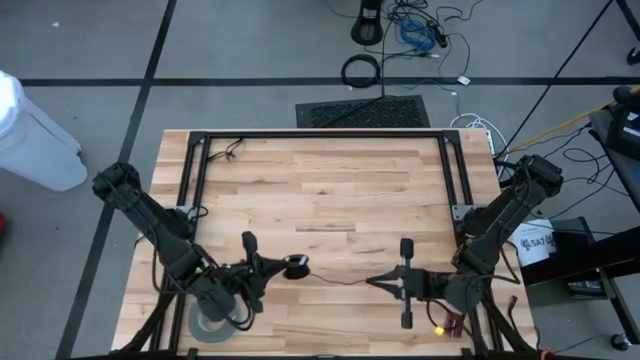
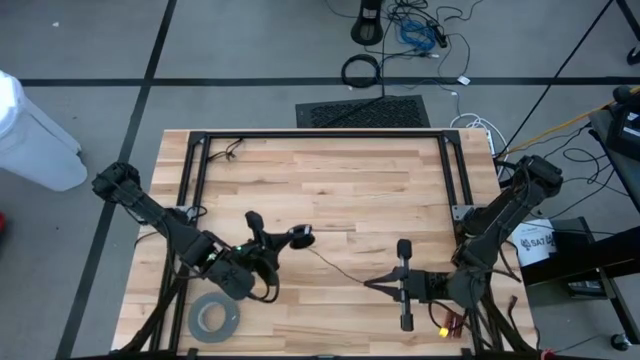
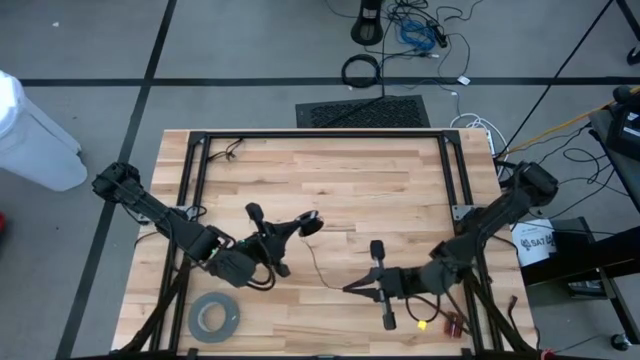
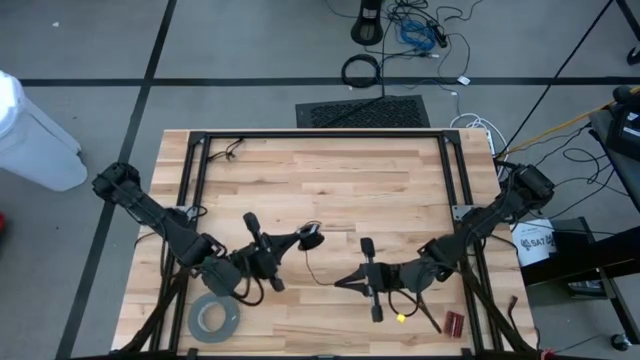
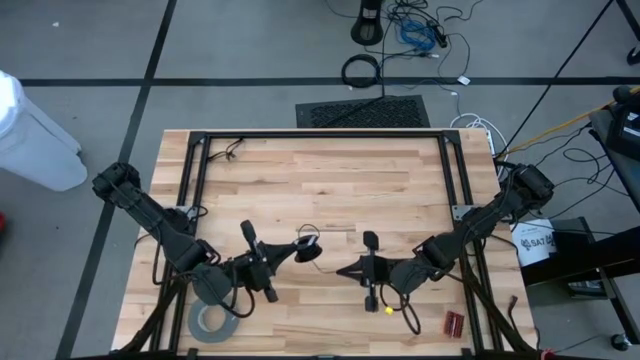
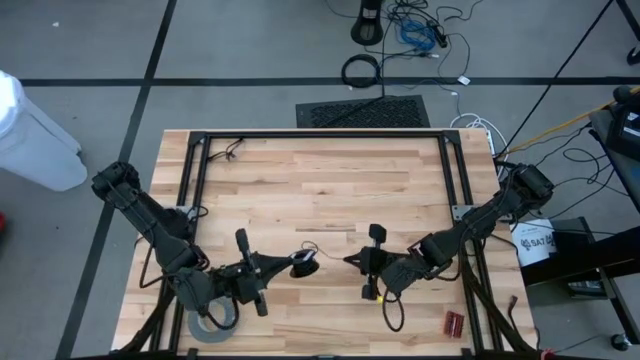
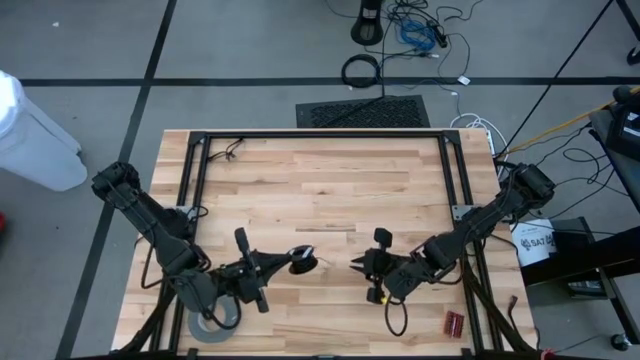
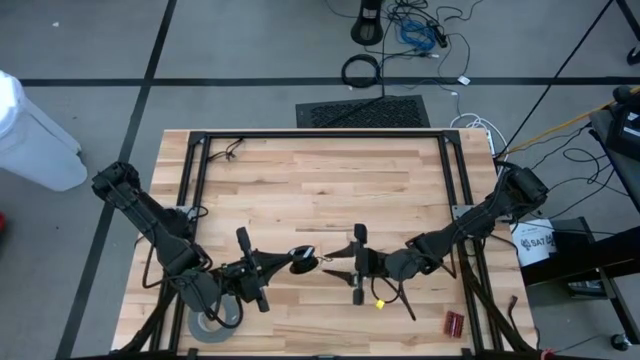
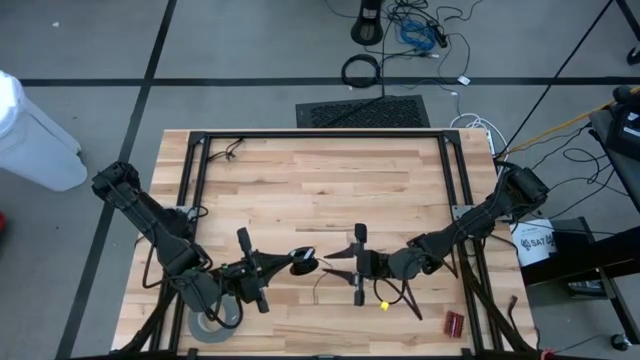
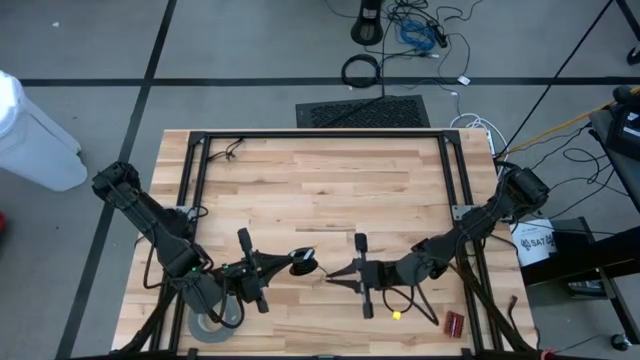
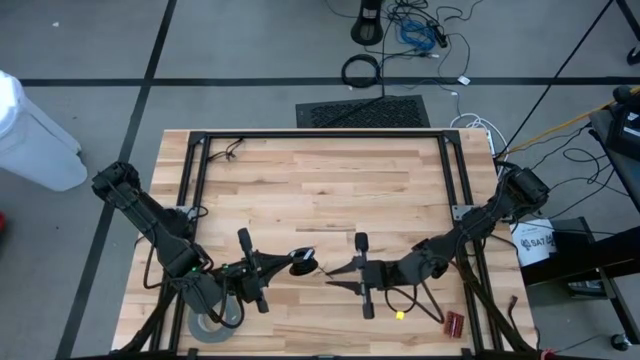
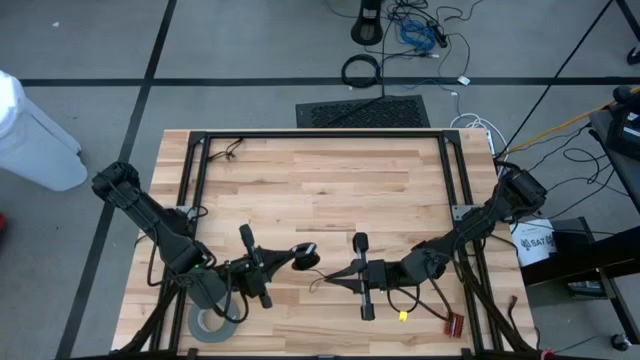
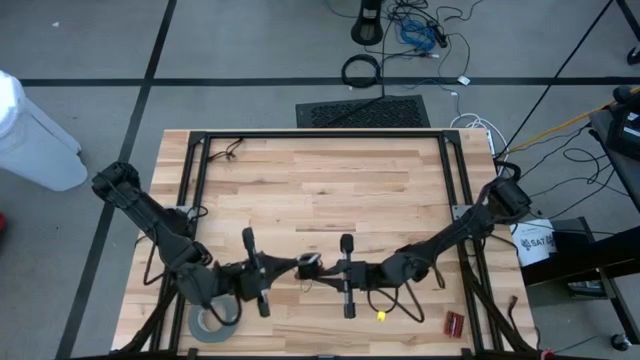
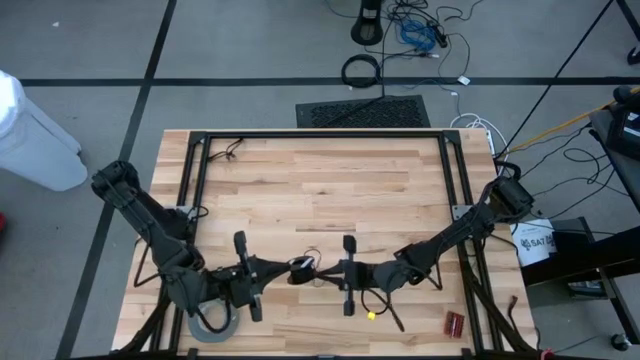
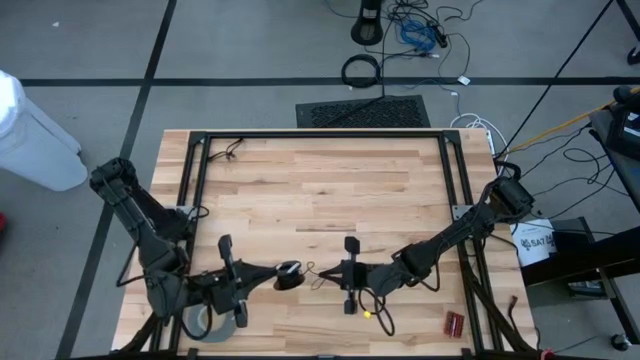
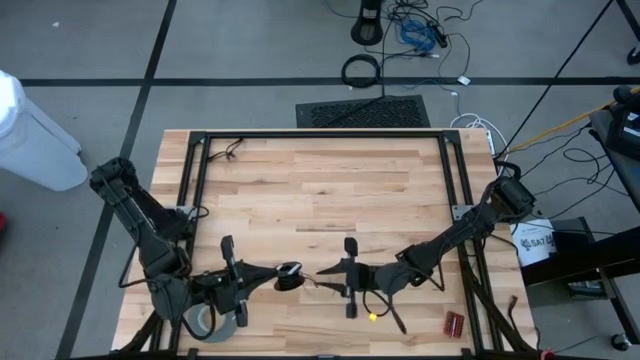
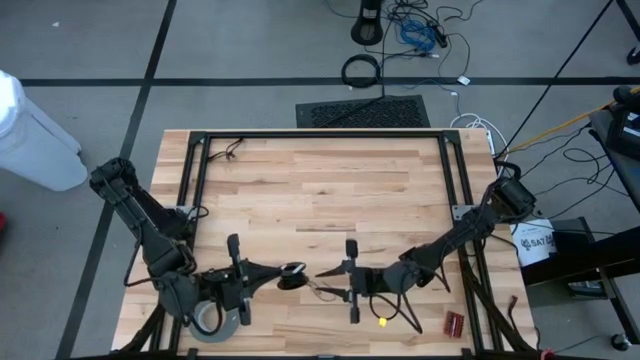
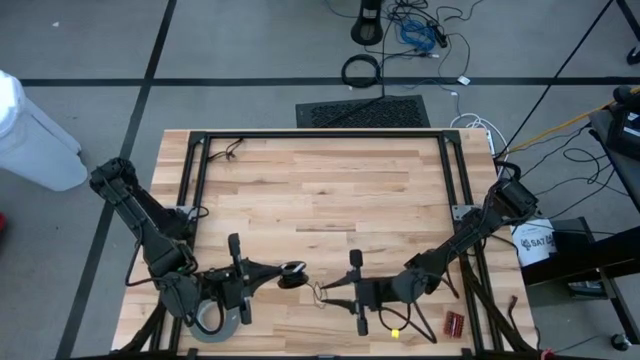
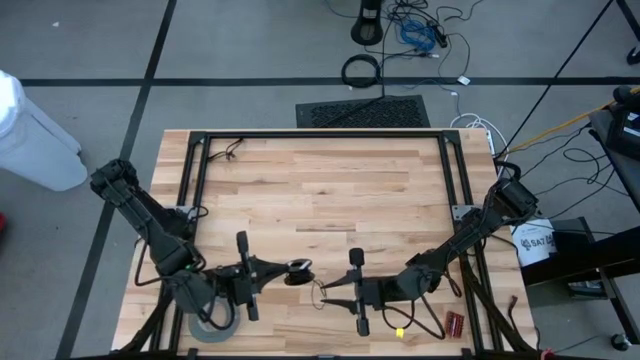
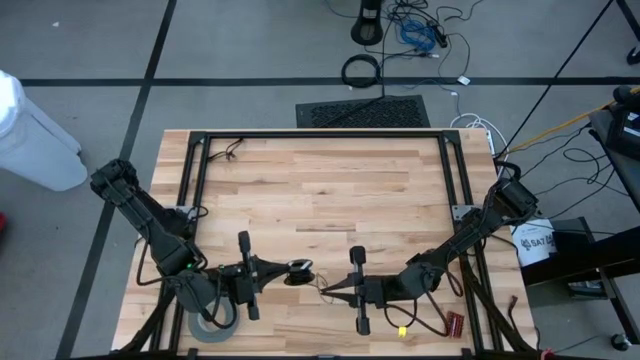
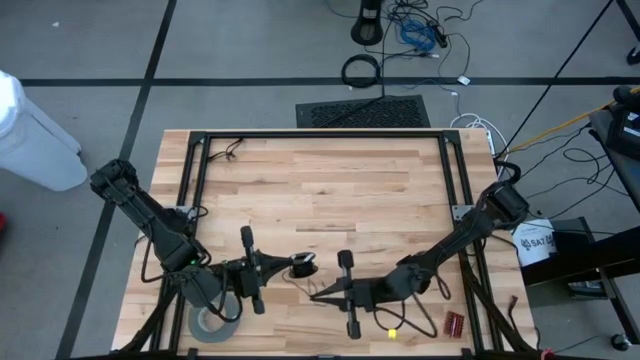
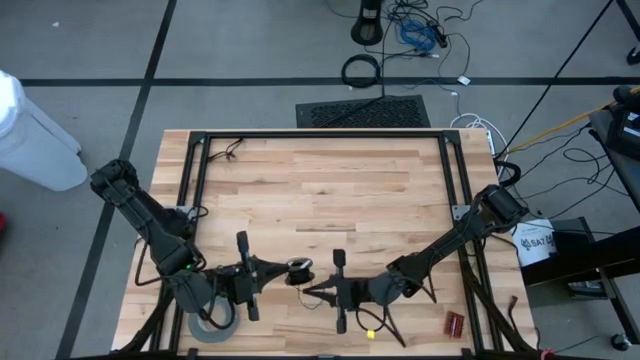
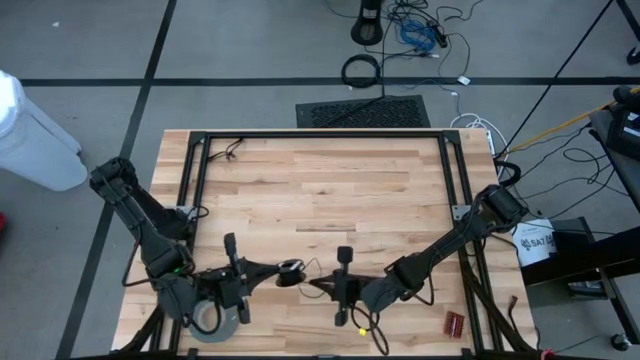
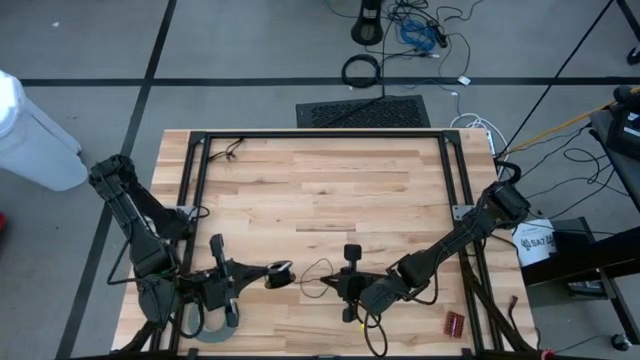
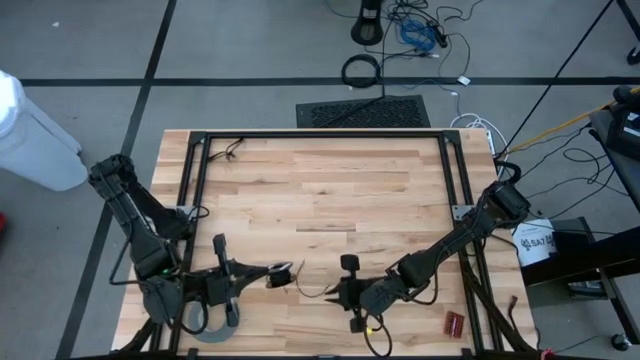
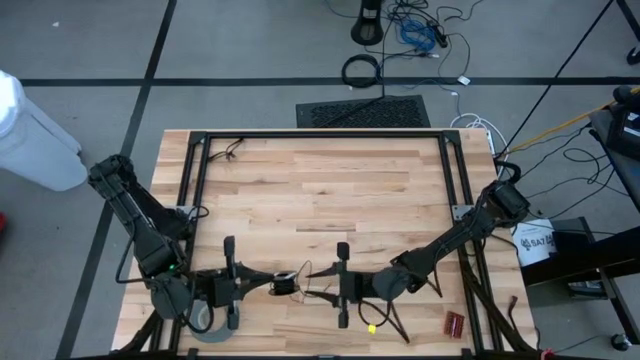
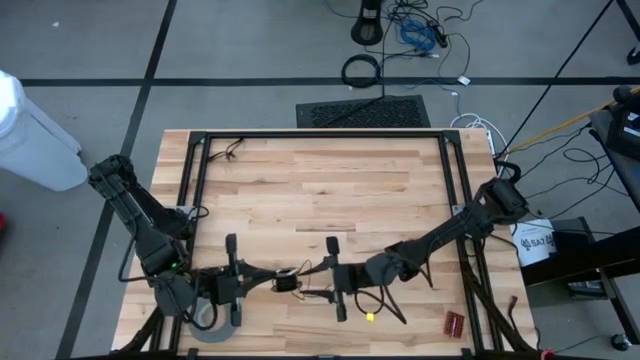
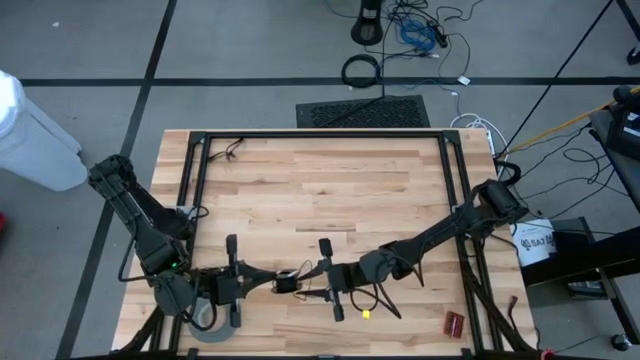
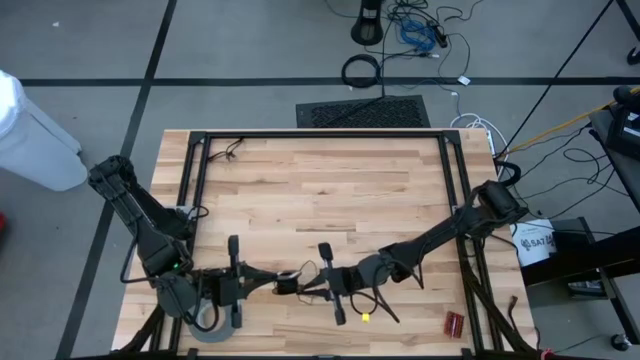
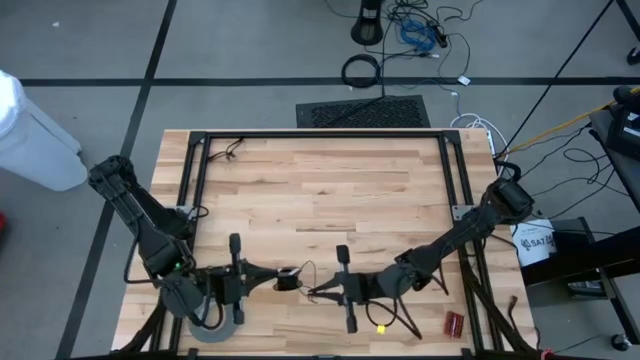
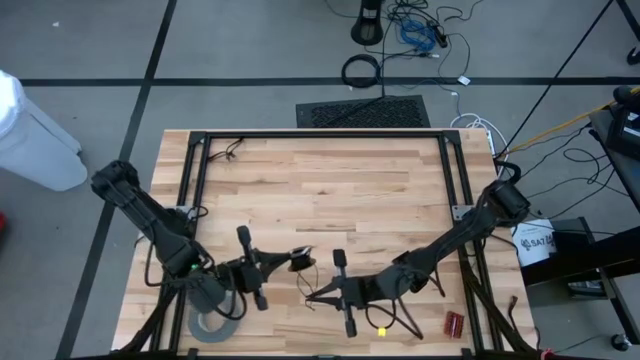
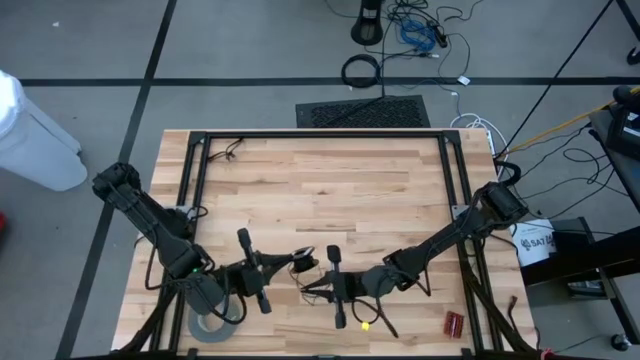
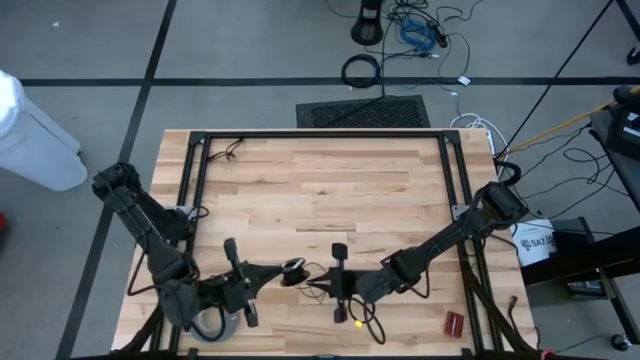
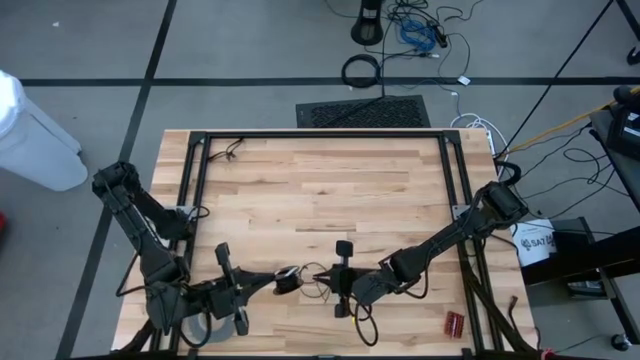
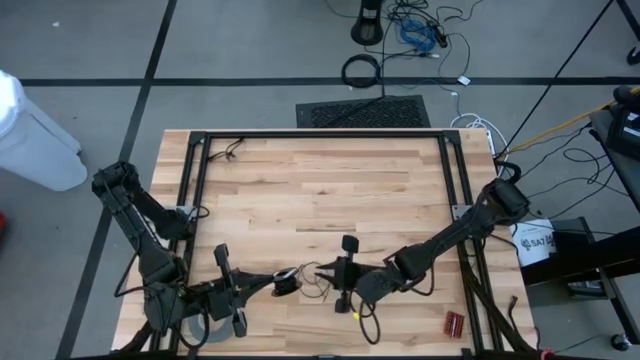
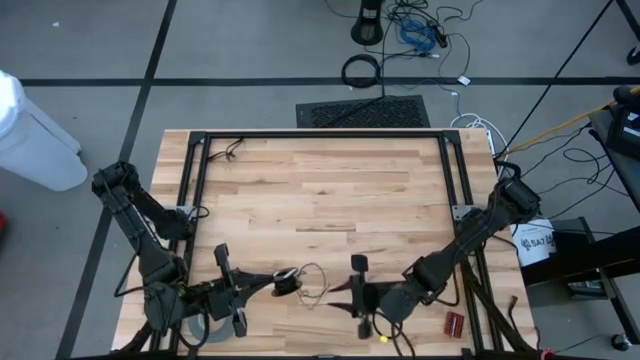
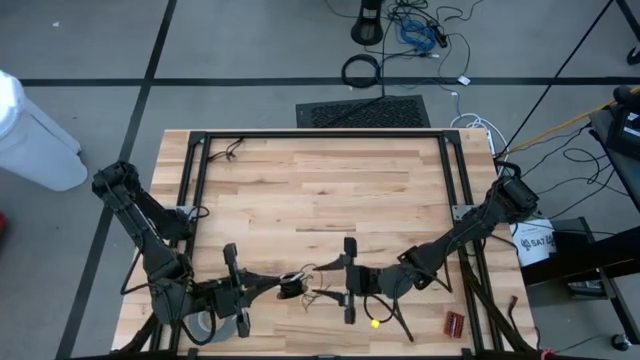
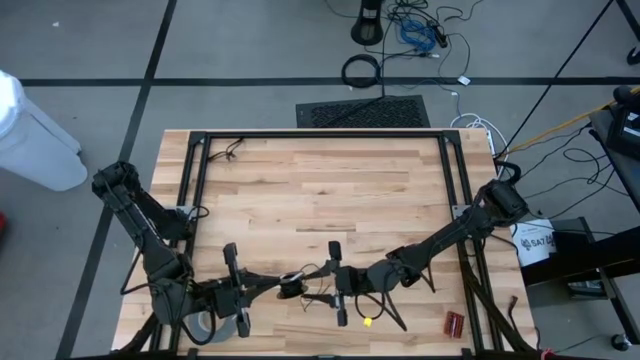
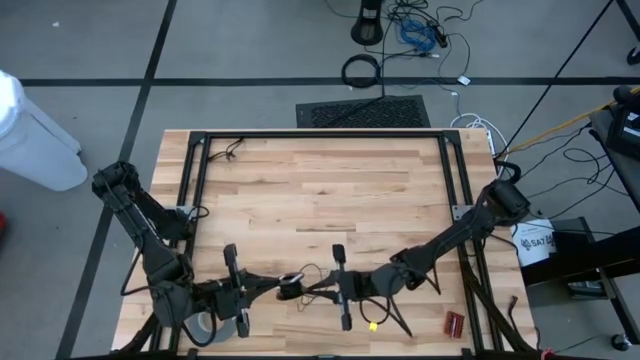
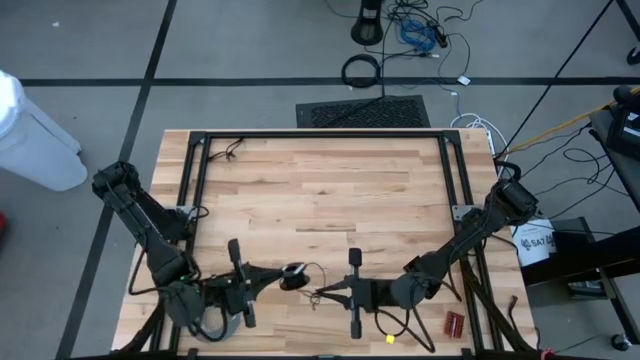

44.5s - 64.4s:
Task: Coil cords
Uncoil the black wire from the spool

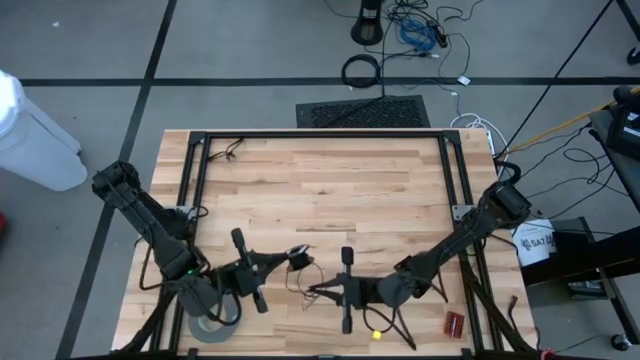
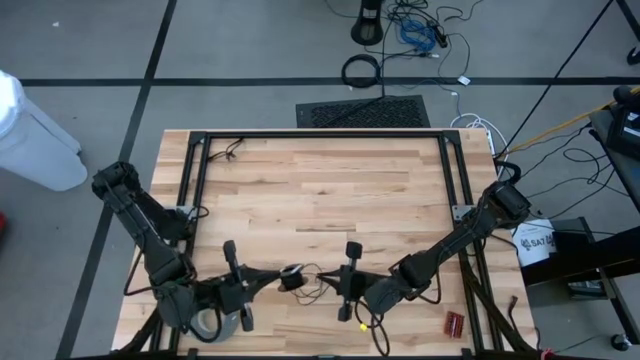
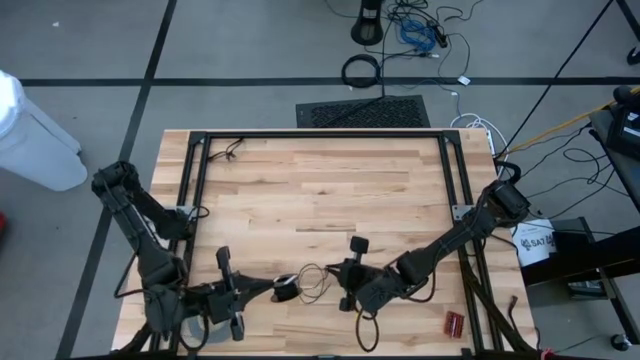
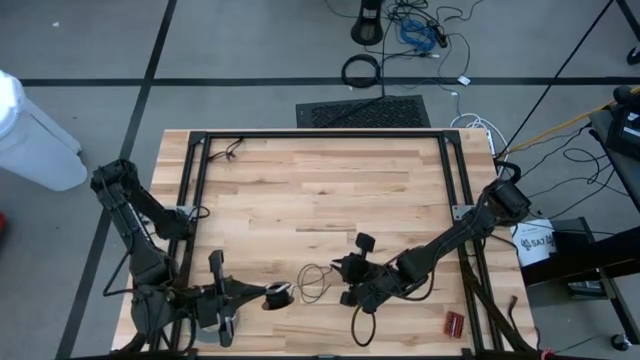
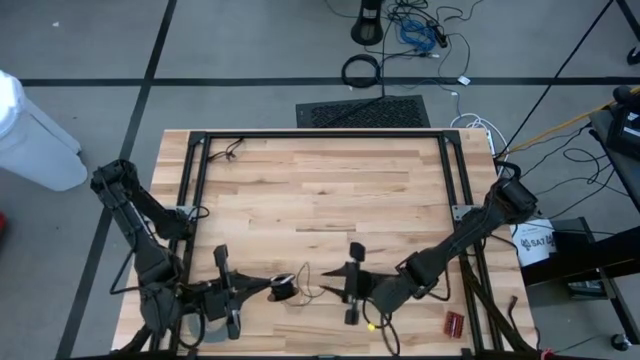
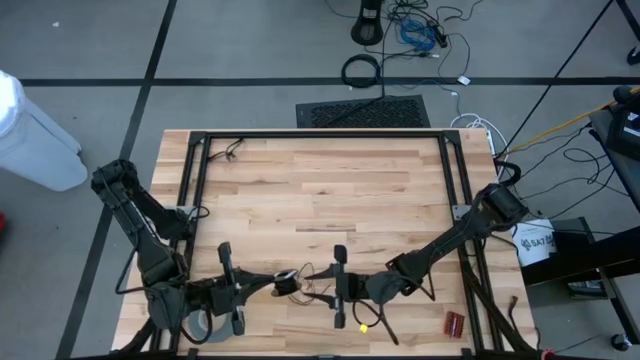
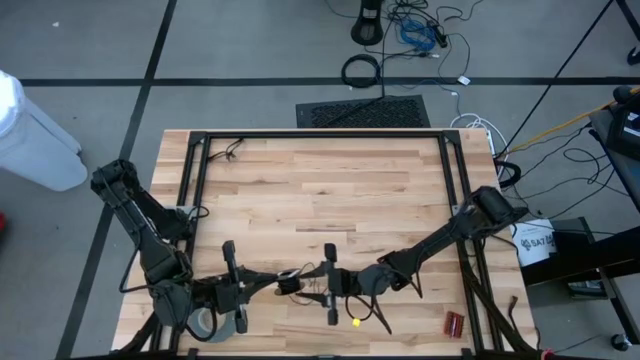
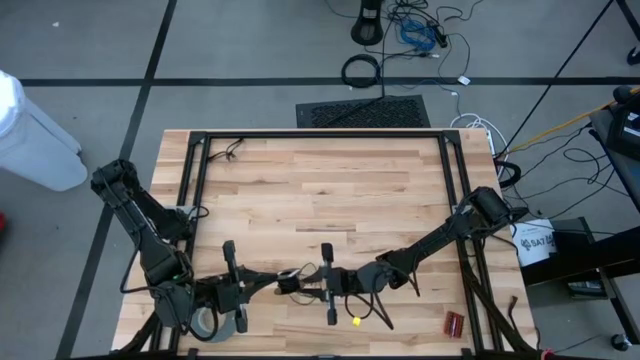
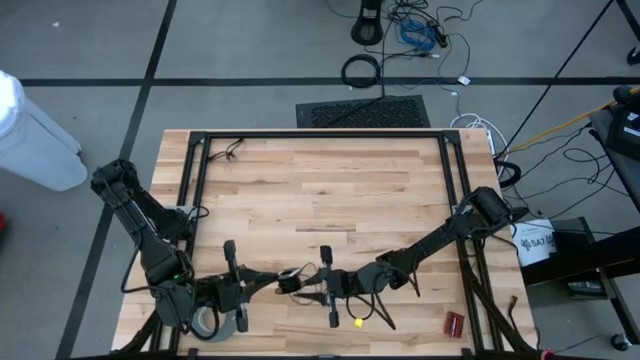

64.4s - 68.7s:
Uncoil the black wire from the spool
